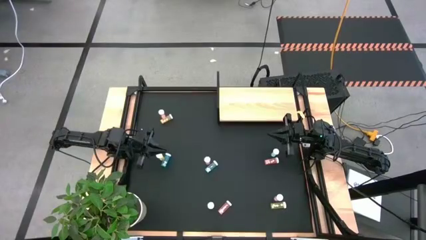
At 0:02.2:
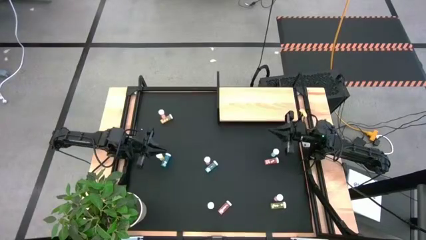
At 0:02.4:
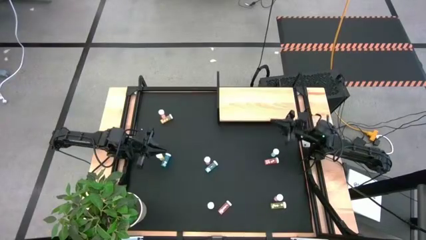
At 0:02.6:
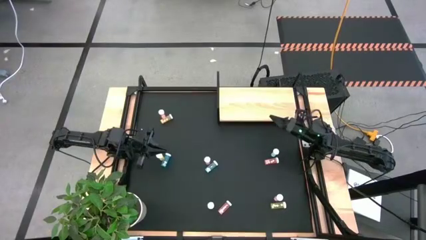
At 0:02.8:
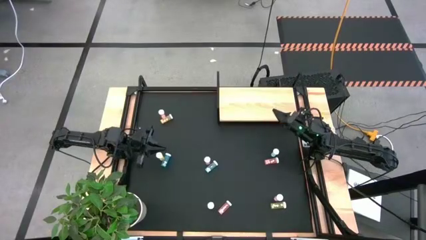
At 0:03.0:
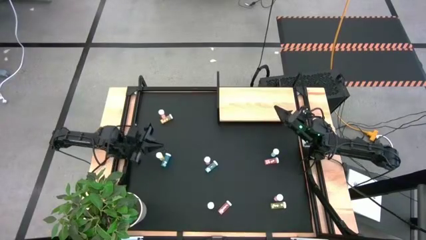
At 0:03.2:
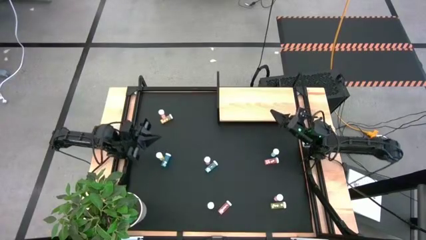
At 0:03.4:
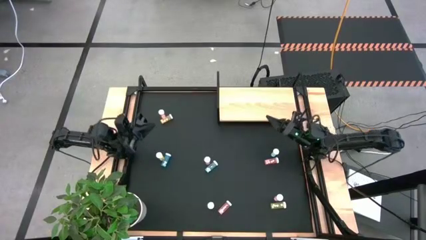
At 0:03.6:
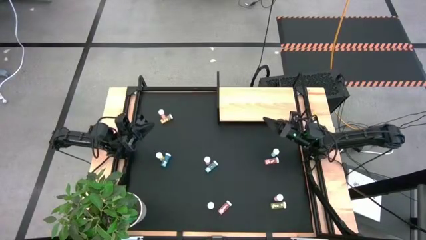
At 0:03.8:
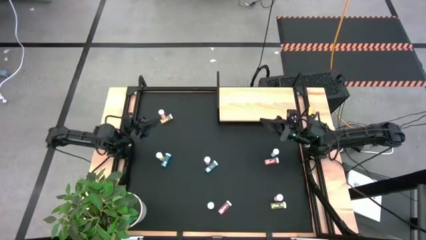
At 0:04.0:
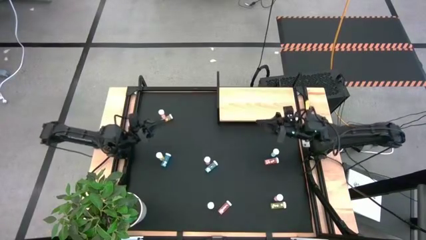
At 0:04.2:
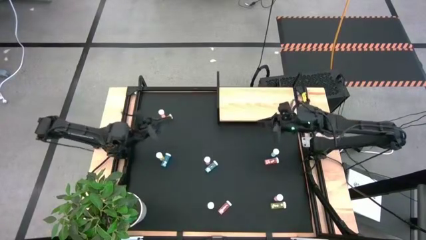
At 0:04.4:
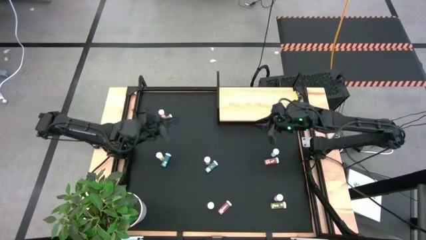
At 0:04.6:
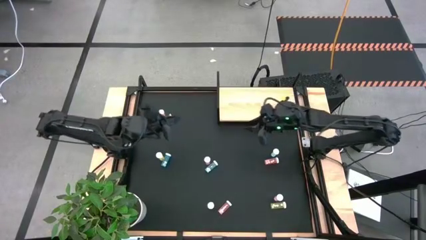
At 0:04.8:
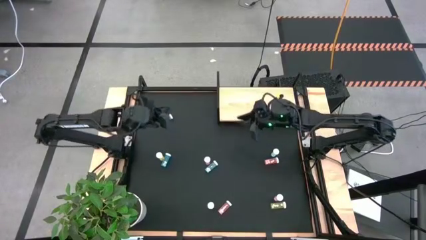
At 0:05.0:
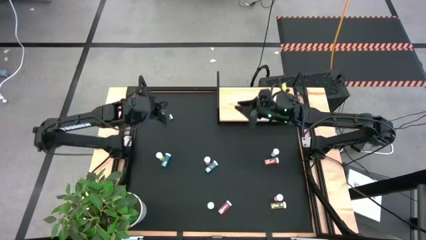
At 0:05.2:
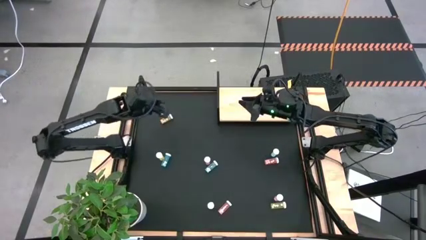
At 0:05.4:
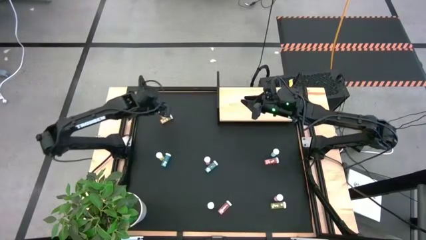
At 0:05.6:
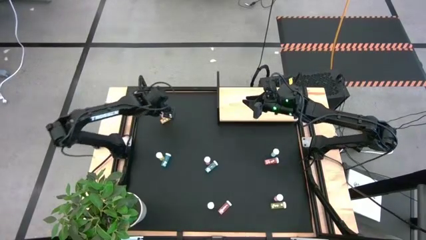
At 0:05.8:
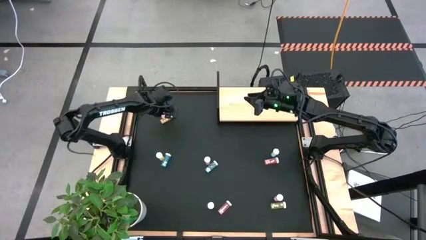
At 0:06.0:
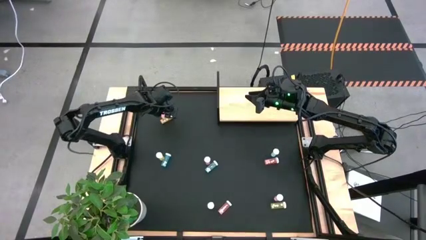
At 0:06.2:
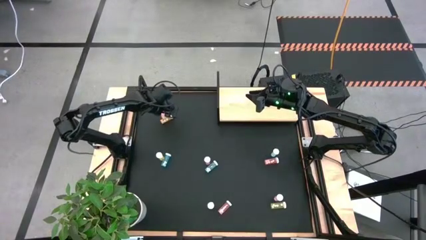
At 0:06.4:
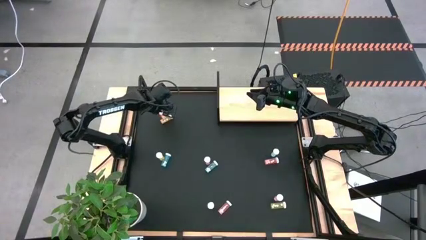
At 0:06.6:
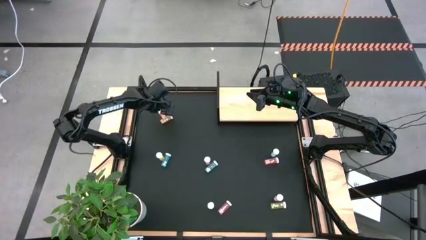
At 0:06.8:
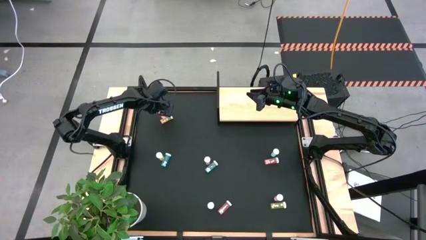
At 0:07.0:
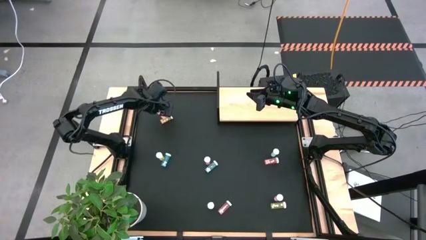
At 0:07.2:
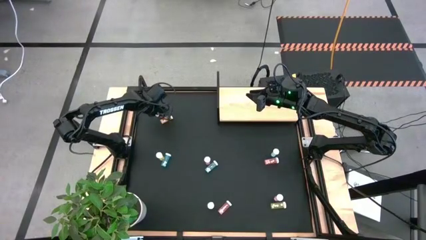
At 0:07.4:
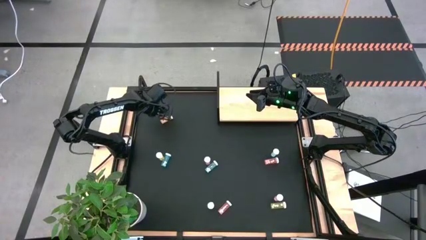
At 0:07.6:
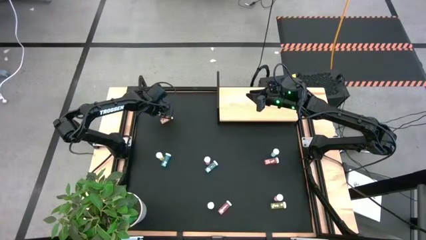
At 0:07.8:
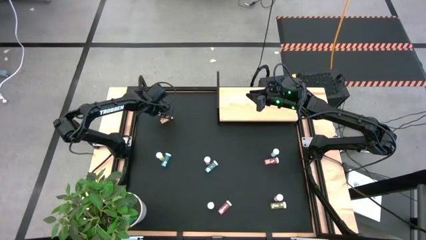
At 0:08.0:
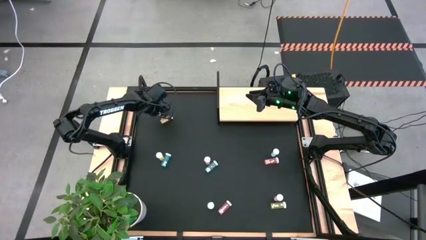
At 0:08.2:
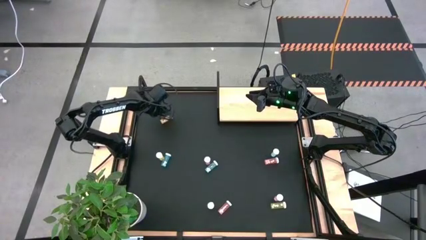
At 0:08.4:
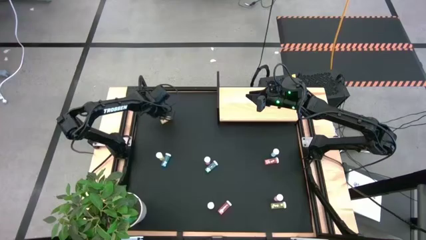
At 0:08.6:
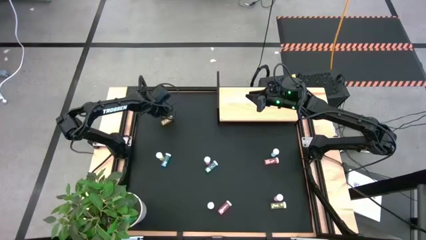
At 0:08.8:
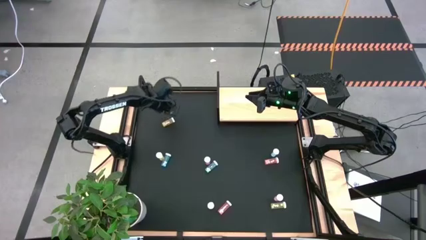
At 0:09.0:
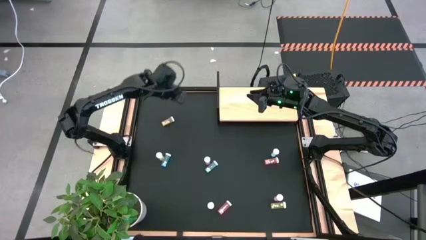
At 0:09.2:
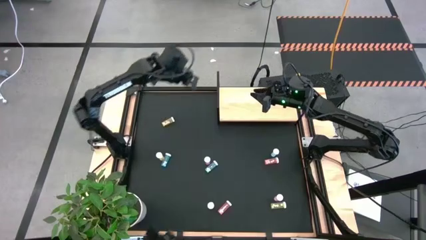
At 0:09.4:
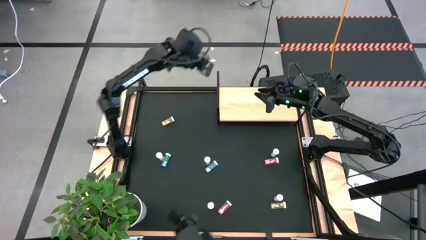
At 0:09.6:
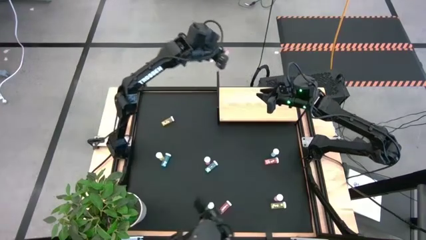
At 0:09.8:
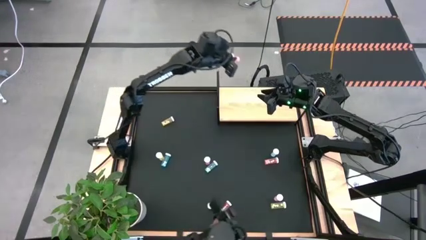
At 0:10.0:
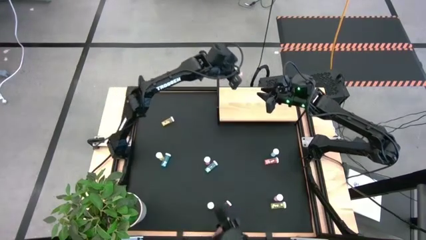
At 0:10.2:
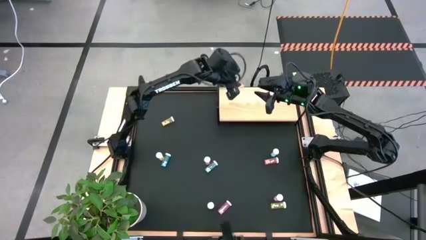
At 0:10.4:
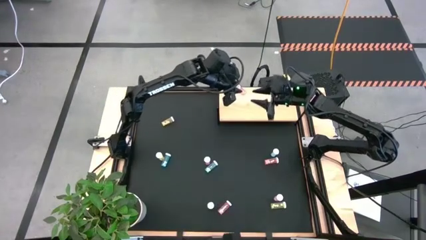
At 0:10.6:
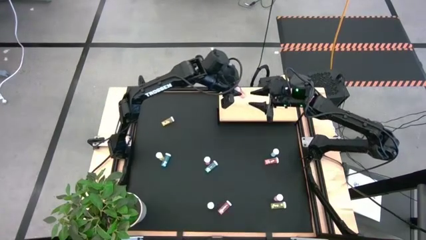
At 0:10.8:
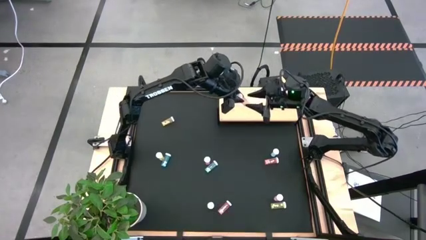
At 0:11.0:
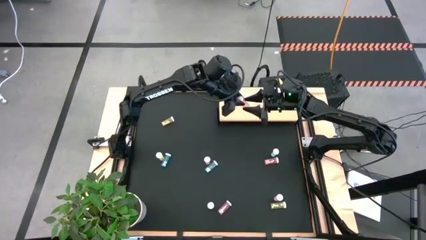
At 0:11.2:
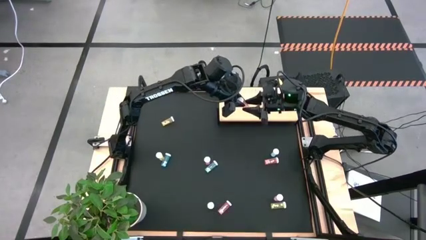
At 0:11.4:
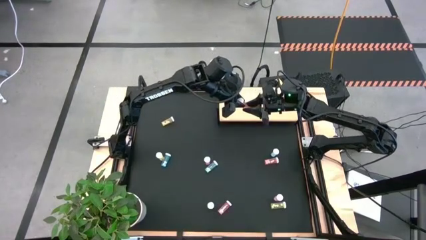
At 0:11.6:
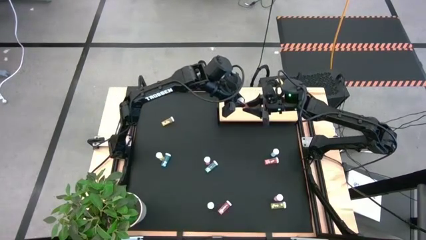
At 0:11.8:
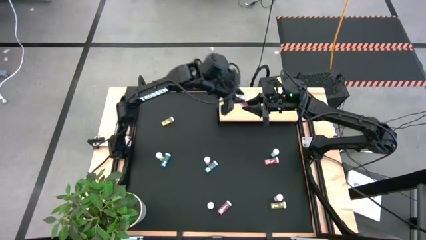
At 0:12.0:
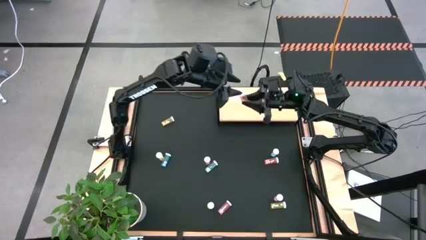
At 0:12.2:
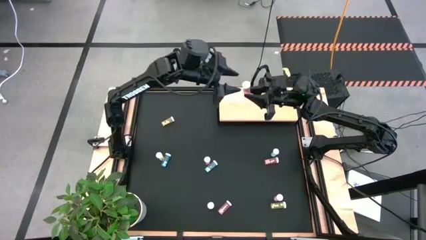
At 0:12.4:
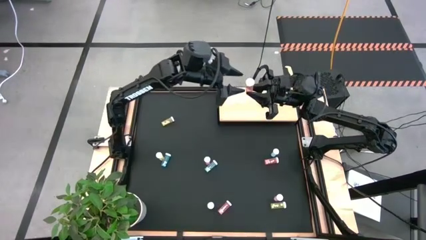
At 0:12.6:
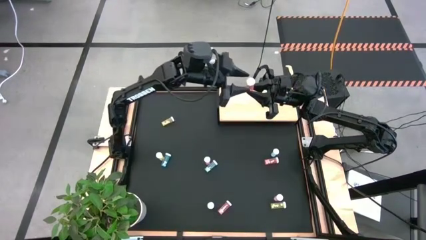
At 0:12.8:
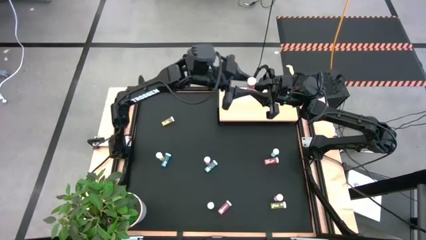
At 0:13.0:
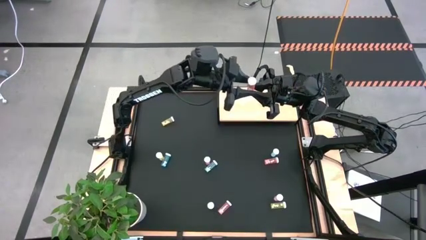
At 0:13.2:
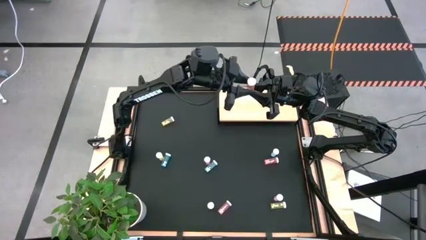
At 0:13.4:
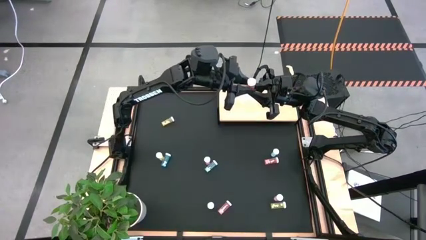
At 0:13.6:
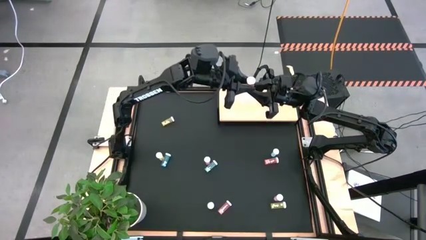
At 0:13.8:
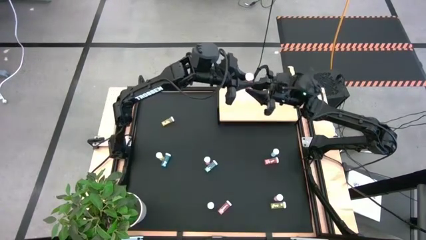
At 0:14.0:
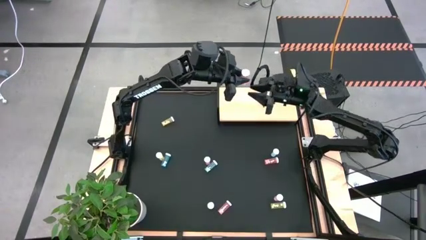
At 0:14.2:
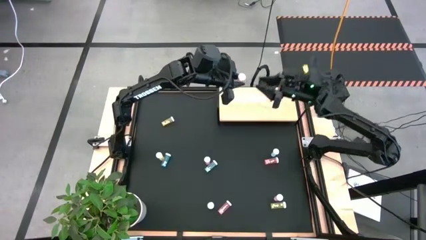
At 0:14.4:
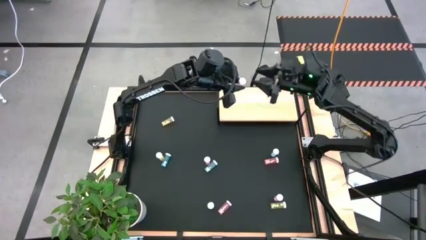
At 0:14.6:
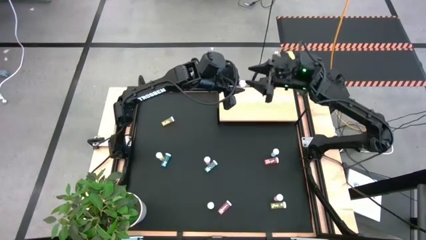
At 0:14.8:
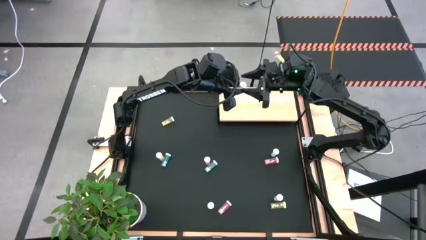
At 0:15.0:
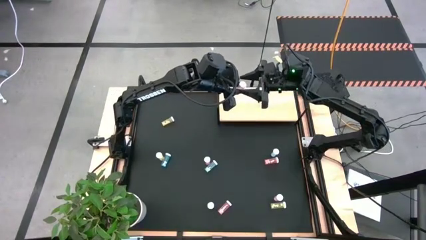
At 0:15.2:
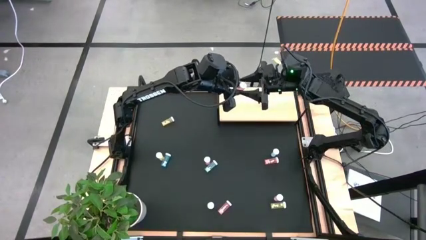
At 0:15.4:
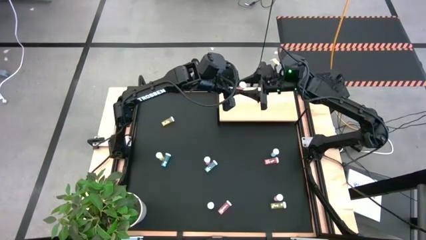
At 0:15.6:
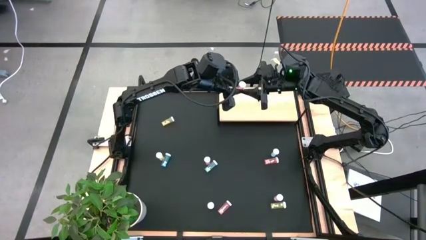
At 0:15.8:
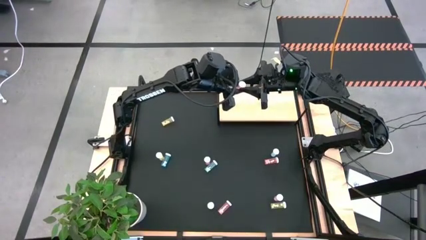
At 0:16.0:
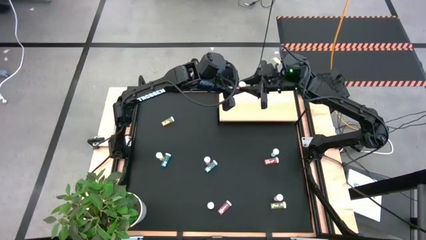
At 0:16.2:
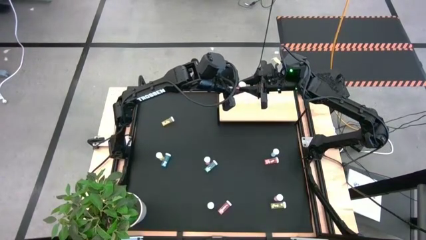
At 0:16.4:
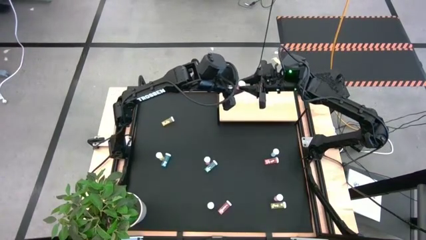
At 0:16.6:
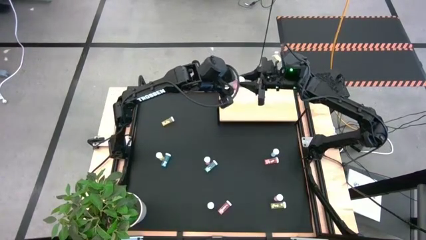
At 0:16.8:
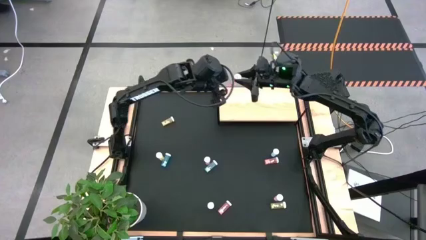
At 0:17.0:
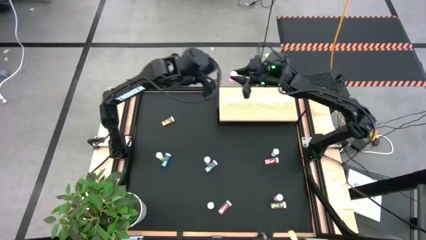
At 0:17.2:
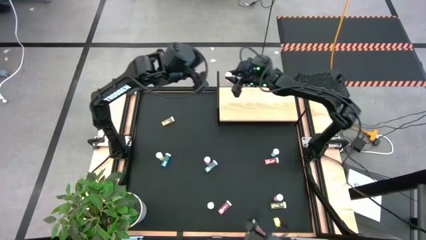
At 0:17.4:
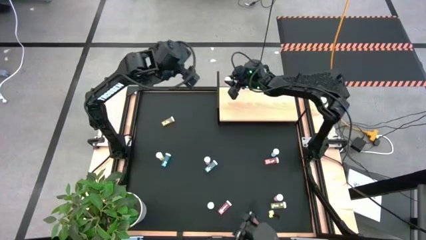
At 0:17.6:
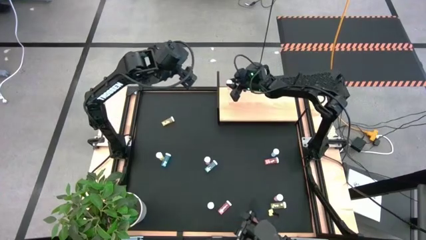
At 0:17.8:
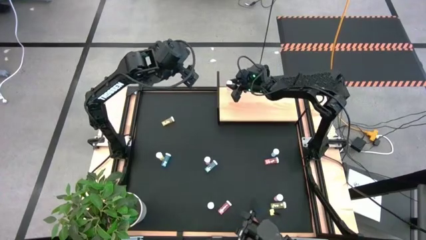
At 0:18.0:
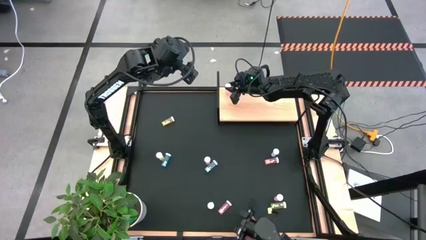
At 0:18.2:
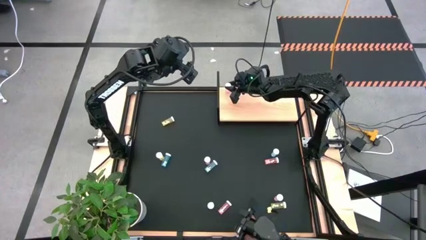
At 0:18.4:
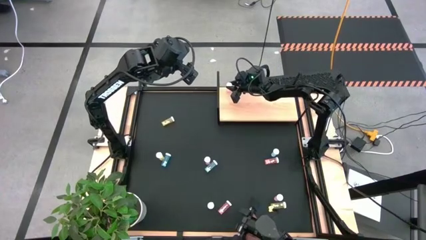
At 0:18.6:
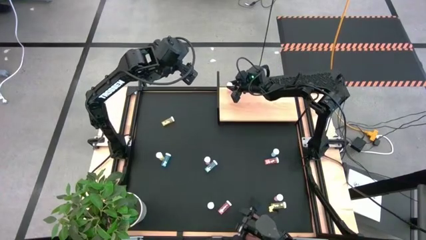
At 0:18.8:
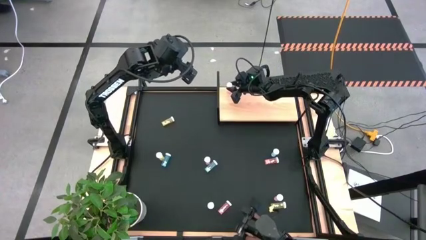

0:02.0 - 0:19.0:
Task: Pick and place medicine bottles onto shelf by color
Put the top pink pill bottle on the shelf
